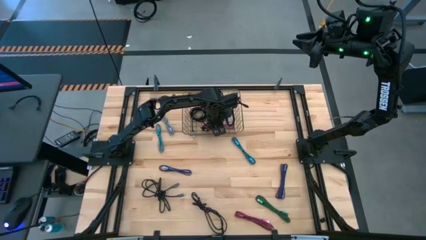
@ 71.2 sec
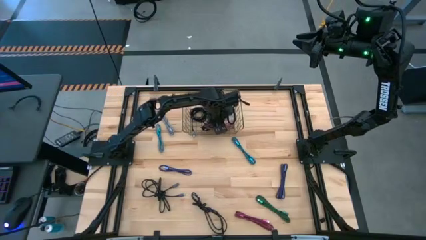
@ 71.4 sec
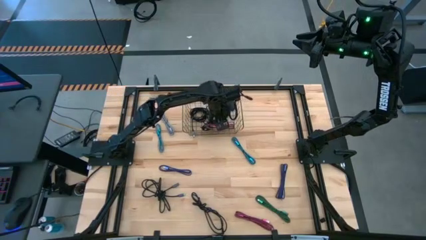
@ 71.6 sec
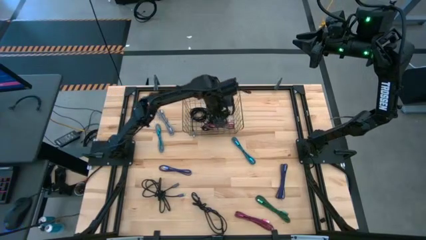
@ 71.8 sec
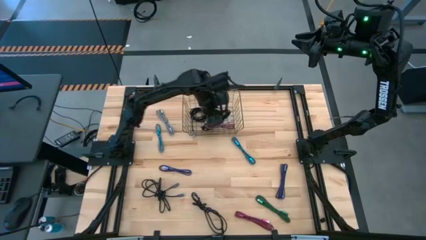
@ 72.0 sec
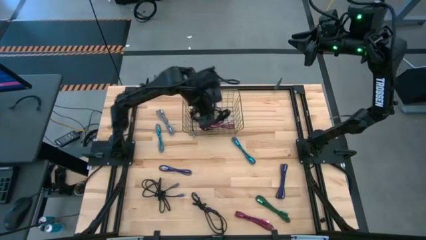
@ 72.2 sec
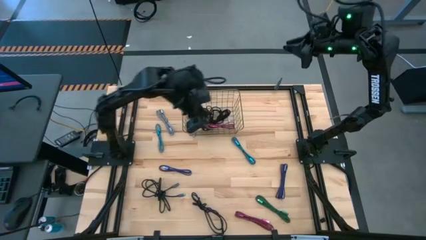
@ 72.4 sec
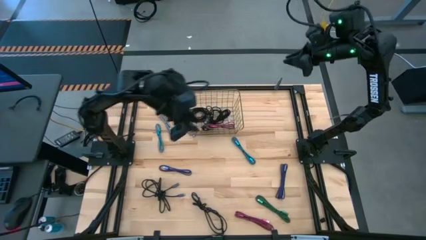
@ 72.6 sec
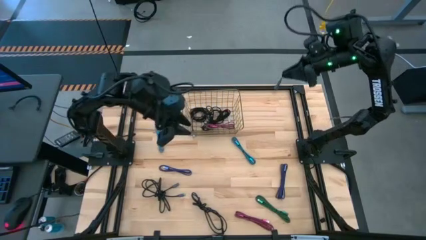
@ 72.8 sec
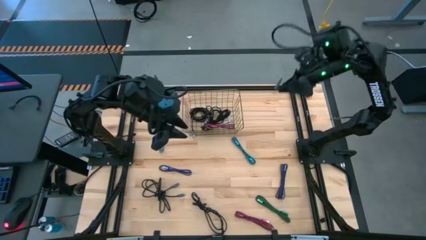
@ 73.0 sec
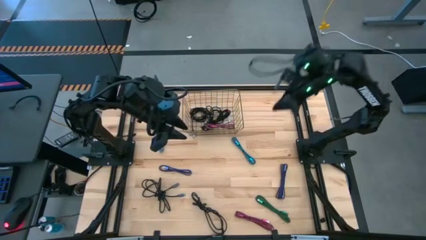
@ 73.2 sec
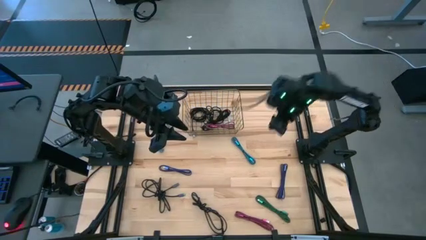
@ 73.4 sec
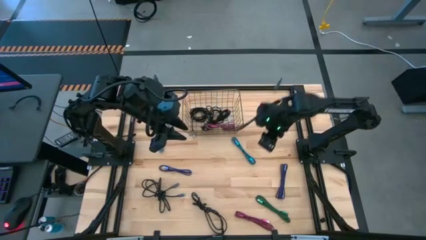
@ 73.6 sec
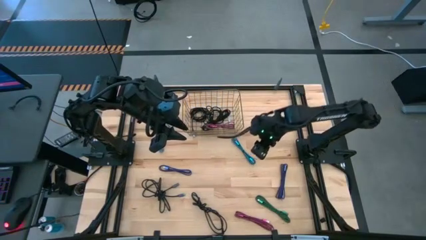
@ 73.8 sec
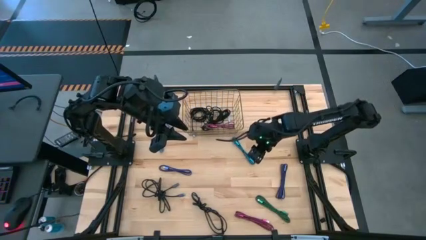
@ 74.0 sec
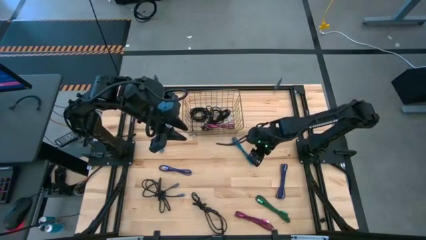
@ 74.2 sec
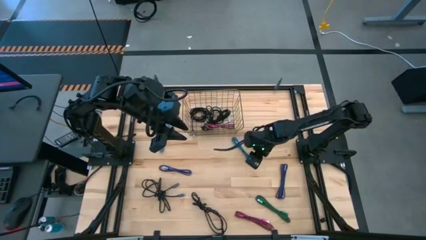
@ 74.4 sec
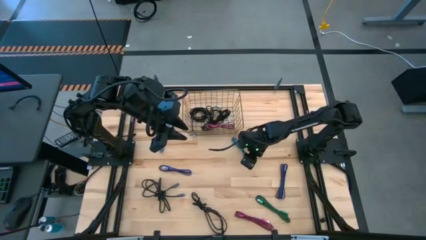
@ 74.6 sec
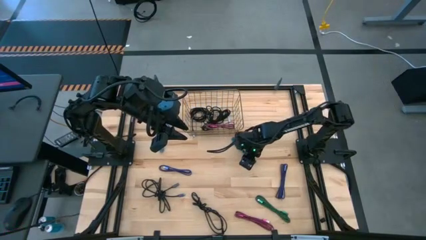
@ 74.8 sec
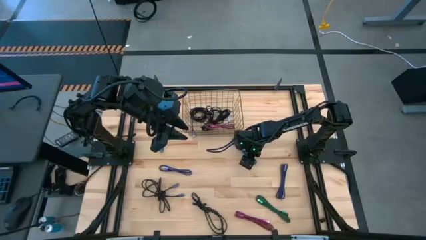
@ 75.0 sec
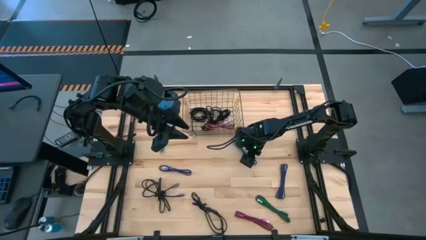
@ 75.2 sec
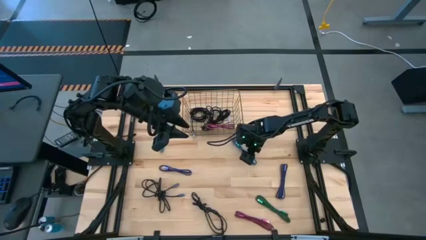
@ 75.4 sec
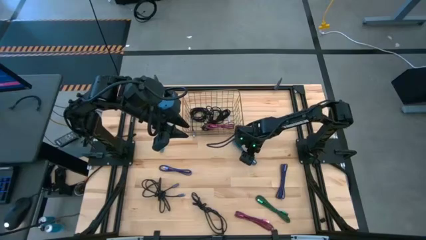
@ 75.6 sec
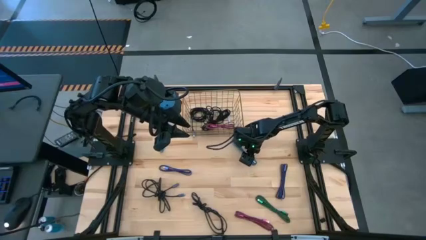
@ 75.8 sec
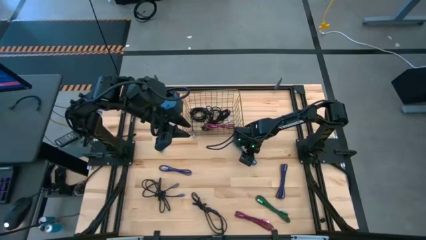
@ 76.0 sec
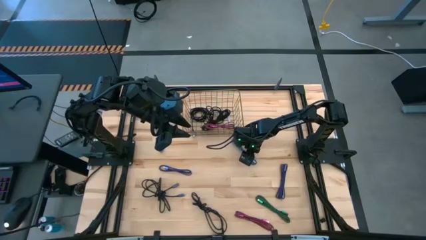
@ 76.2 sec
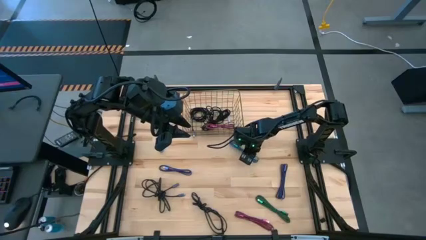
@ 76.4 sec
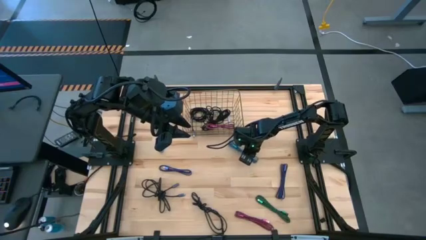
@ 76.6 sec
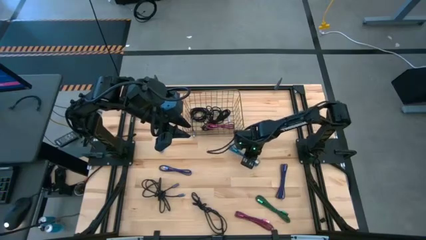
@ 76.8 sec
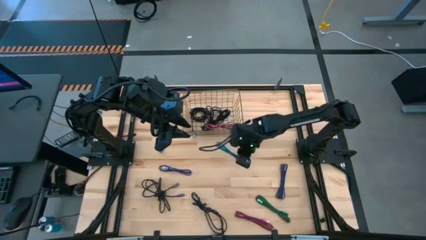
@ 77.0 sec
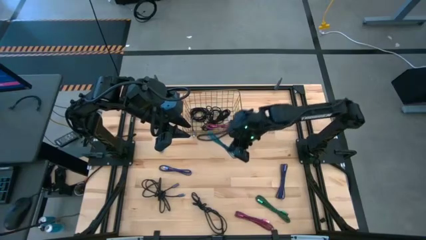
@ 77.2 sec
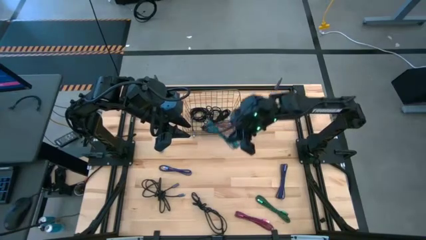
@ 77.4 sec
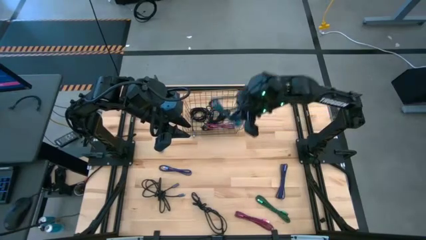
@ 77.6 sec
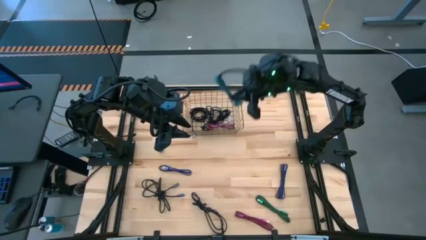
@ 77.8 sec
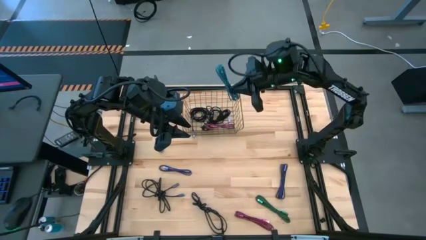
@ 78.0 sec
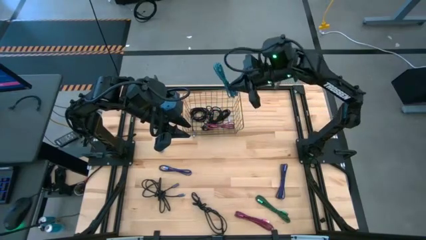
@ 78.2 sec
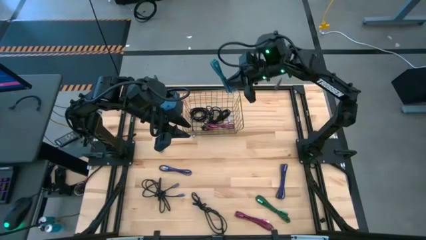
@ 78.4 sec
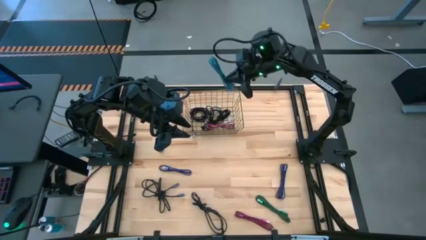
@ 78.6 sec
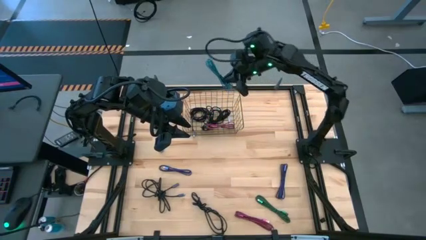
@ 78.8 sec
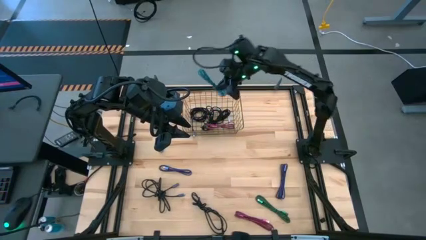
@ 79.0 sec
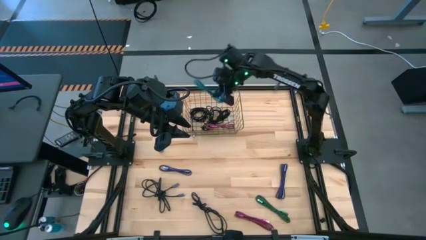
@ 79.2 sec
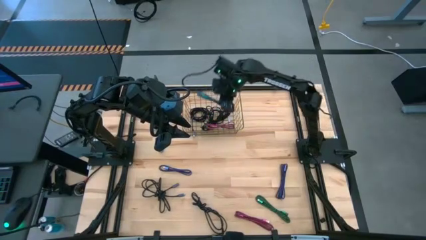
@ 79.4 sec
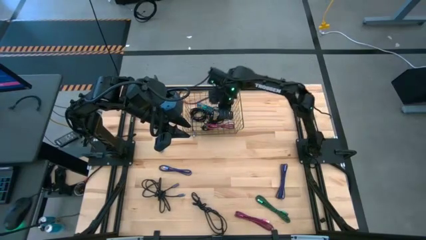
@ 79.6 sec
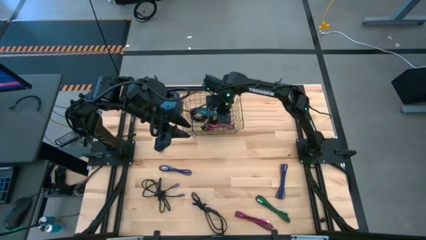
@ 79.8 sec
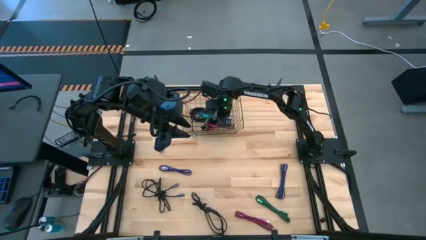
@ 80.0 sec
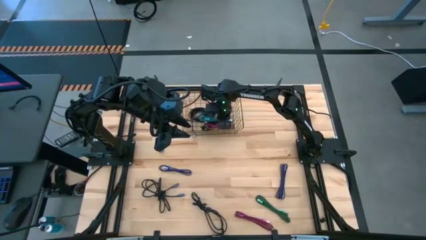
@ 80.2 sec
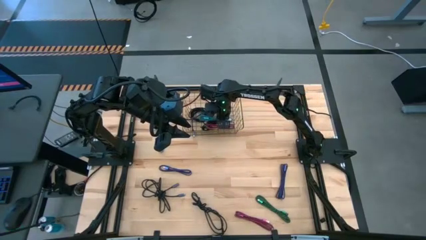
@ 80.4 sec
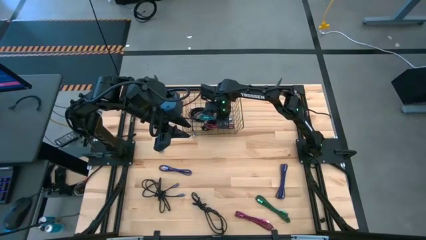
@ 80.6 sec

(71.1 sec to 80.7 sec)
Task: Pick and place USB-C Cables
Put the blue charger cable into the wire basket

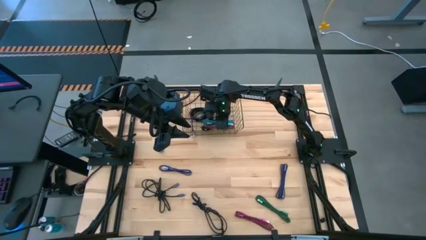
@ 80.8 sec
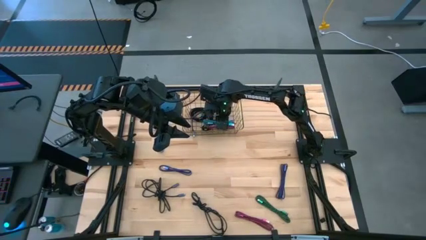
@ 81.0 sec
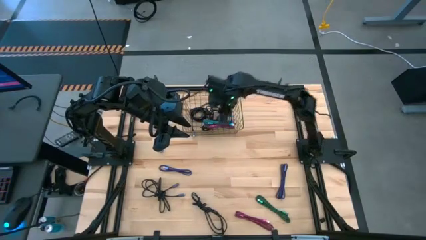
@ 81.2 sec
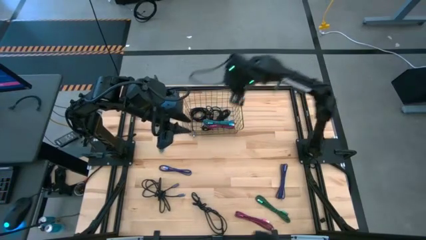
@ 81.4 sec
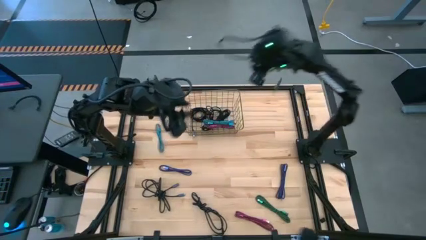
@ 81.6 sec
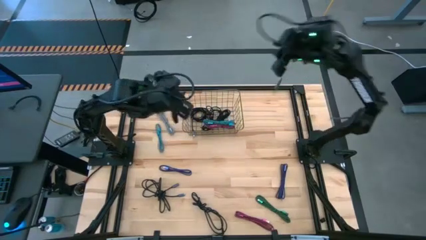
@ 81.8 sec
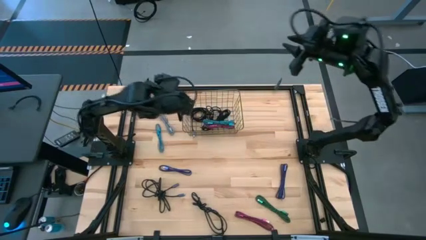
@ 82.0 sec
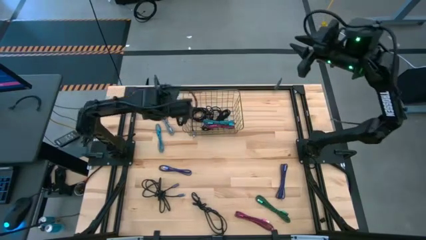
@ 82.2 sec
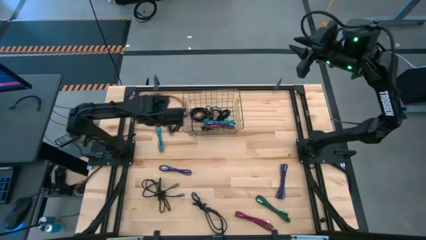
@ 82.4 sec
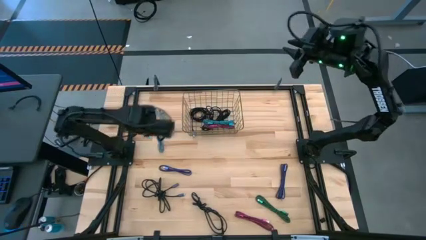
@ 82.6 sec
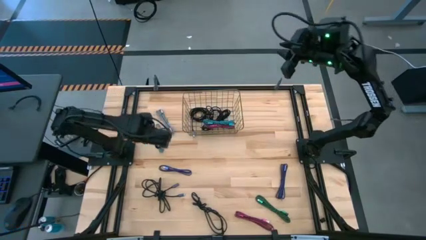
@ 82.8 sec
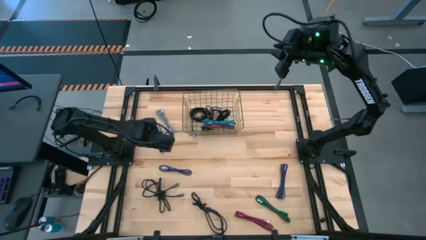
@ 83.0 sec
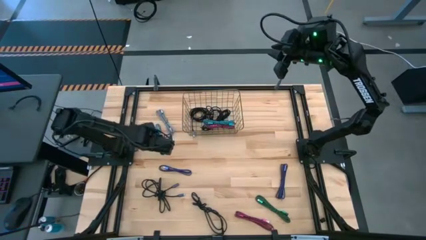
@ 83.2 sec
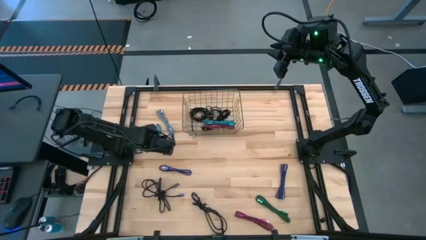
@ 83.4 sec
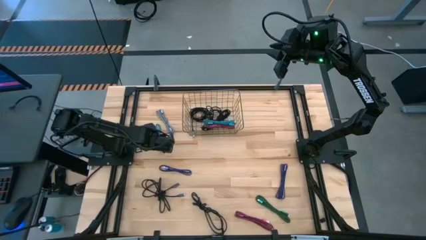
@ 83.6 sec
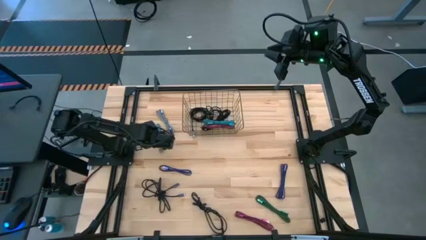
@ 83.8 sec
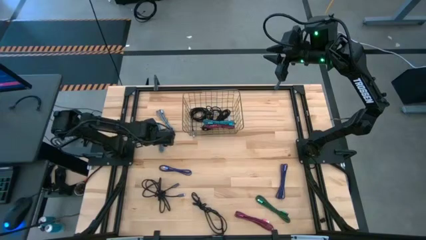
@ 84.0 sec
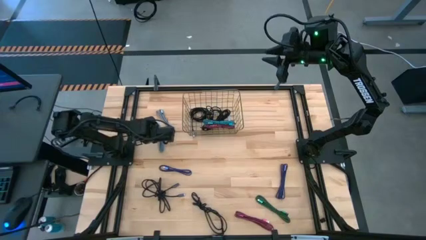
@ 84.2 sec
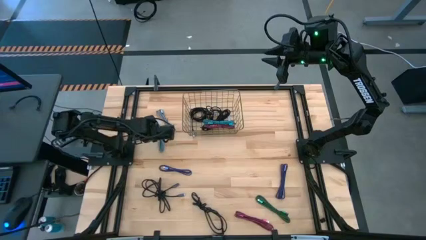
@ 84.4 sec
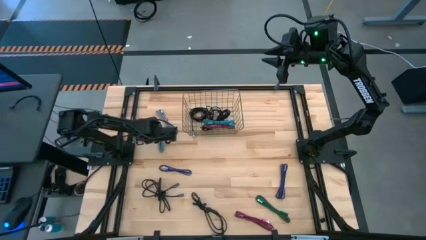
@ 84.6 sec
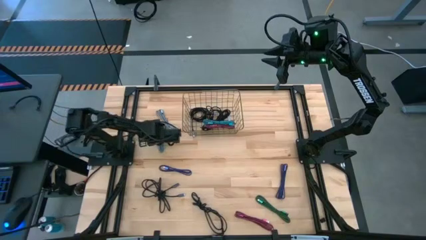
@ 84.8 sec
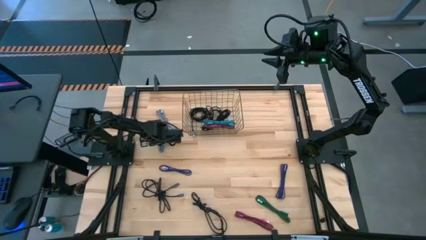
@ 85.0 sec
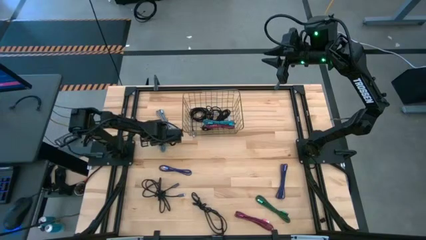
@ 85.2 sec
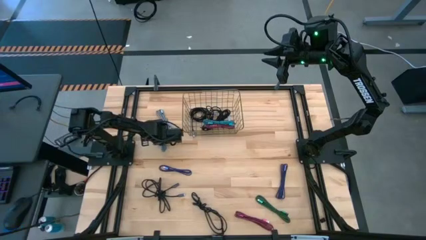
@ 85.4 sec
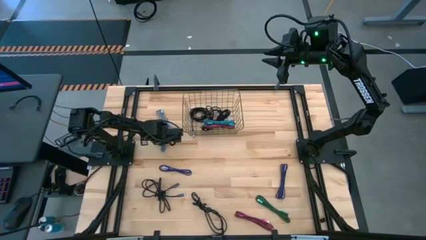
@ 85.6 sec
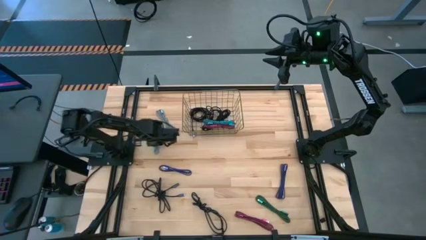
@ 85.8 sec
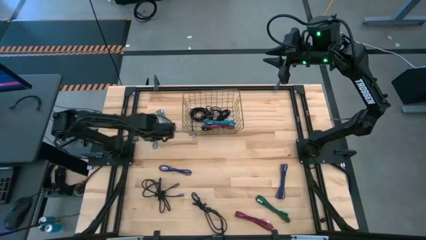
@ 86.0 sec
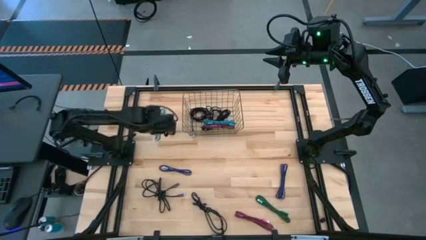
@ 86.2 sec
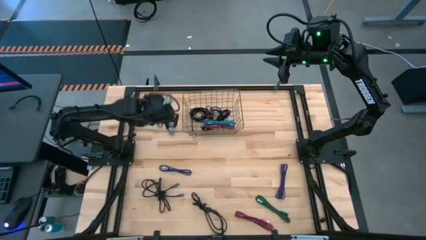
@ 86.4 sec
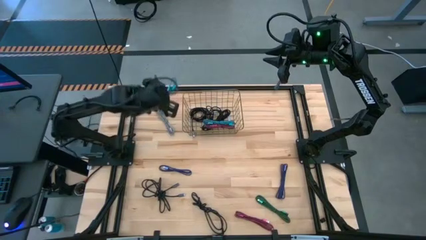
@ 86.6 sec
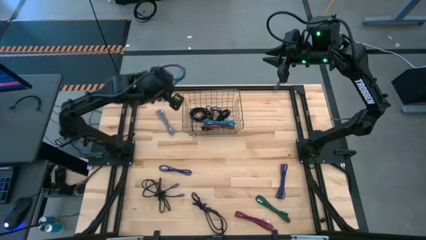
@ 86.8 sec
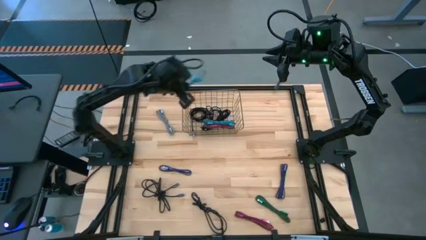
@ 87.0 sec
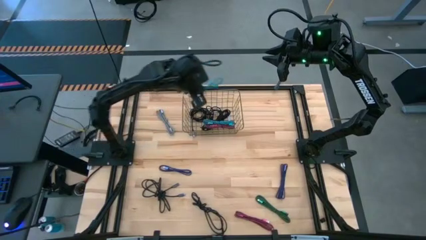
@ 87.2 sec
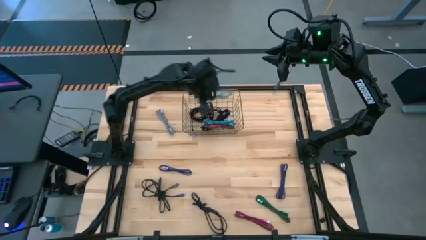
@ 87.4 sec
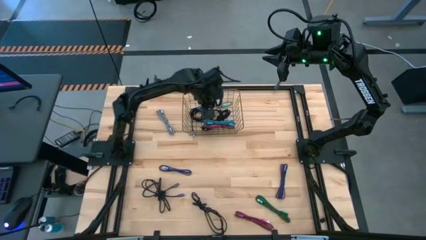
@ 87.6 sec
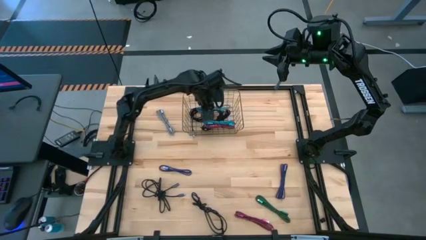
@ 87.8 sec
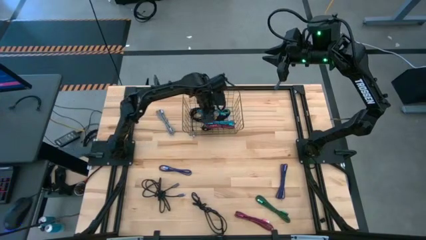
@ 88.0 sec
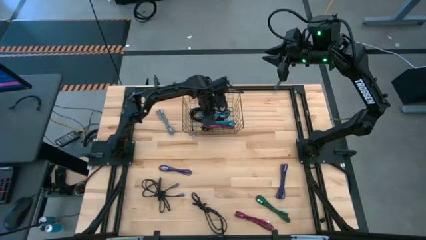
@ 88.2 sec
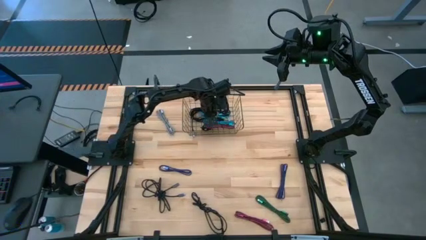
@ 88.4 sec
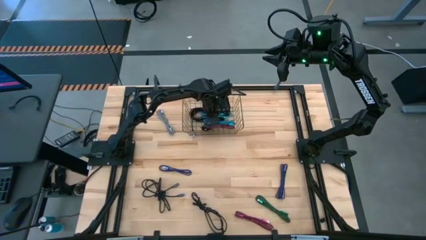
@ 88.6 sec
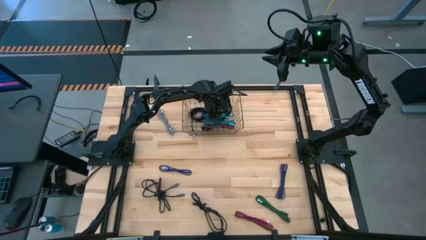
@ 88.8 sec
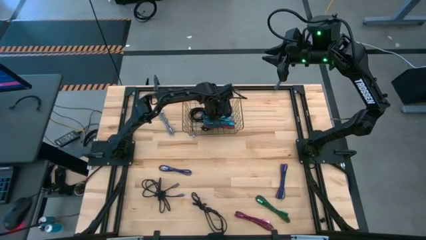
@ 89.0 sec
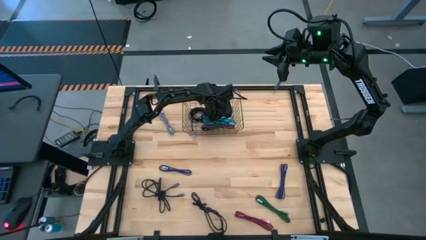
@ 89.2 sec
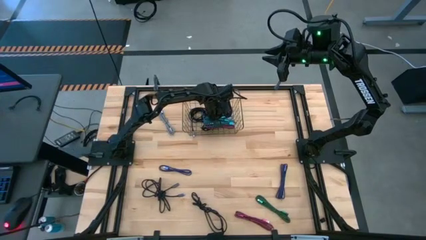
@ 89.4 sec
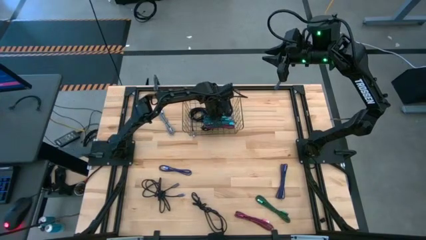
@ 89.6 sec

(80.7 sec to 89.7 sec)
Put the blue charger cable into the wire basket
